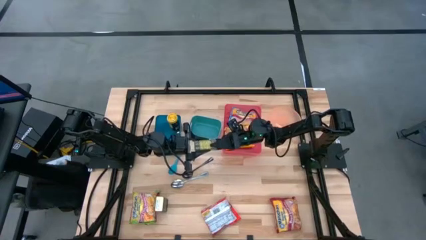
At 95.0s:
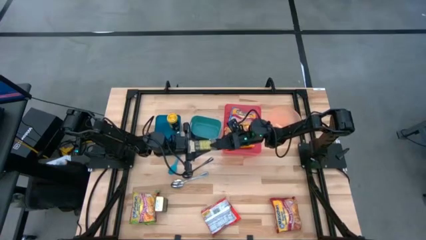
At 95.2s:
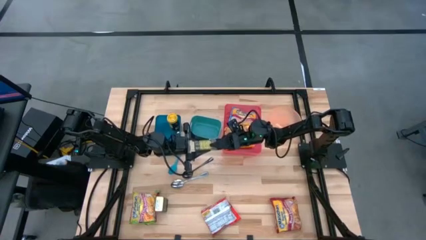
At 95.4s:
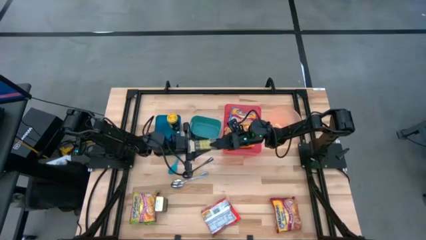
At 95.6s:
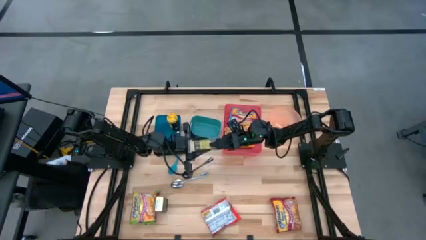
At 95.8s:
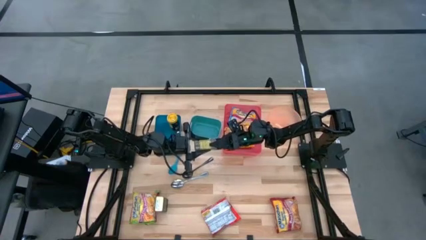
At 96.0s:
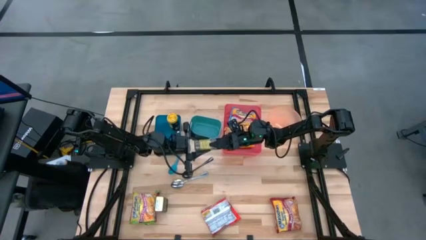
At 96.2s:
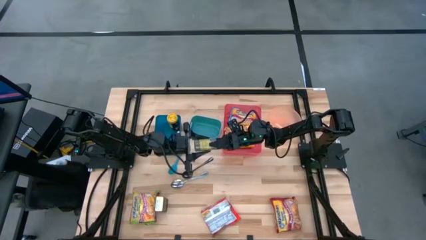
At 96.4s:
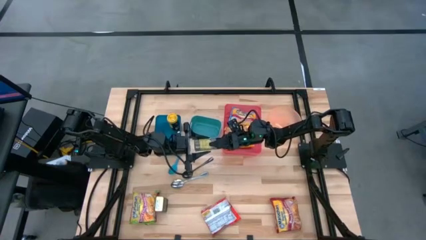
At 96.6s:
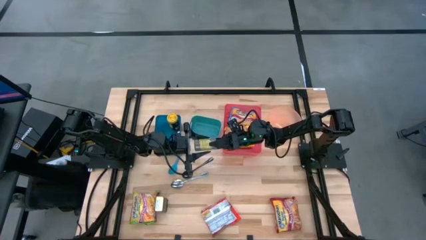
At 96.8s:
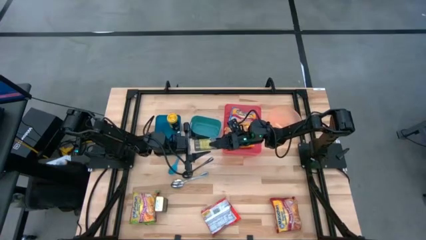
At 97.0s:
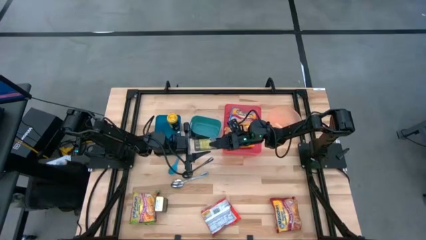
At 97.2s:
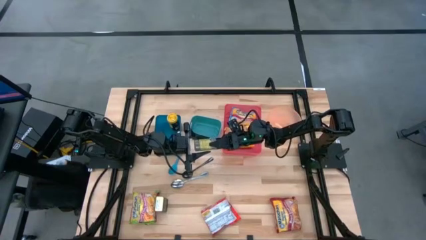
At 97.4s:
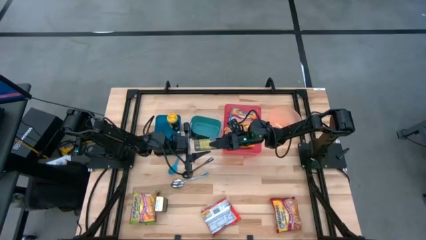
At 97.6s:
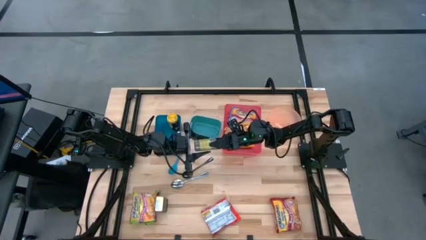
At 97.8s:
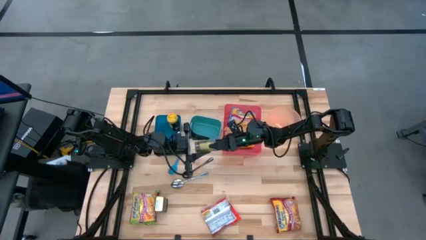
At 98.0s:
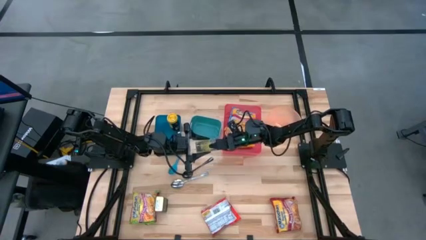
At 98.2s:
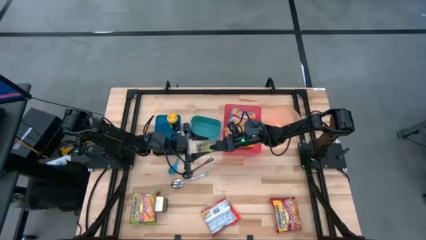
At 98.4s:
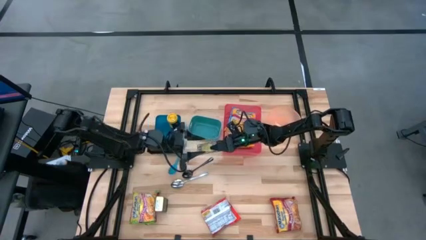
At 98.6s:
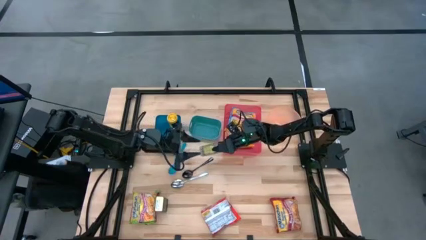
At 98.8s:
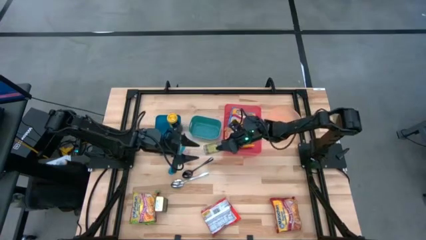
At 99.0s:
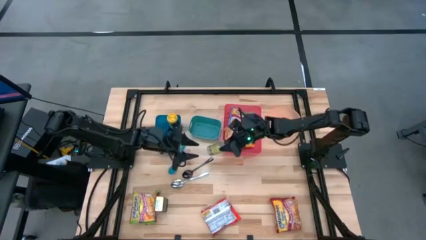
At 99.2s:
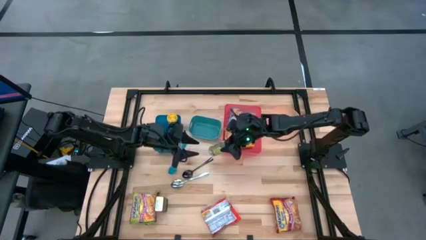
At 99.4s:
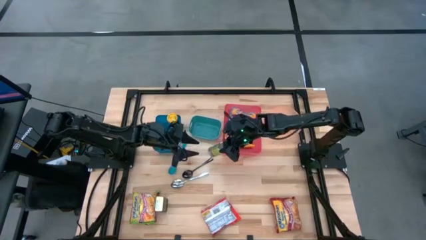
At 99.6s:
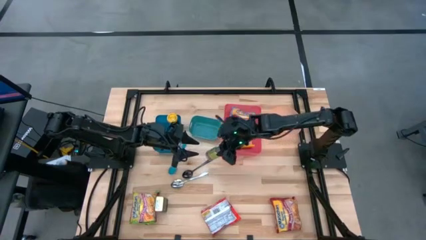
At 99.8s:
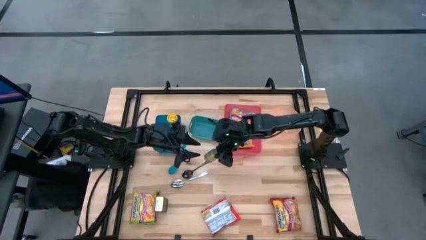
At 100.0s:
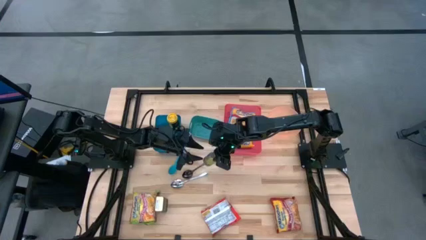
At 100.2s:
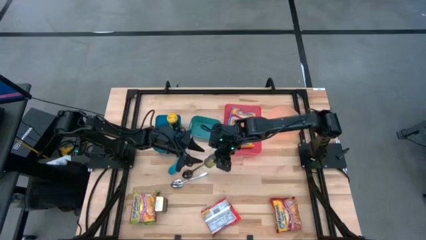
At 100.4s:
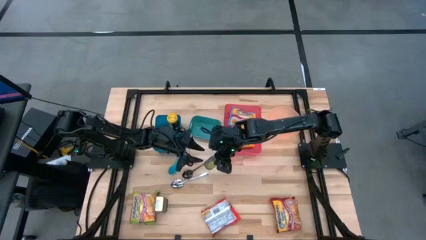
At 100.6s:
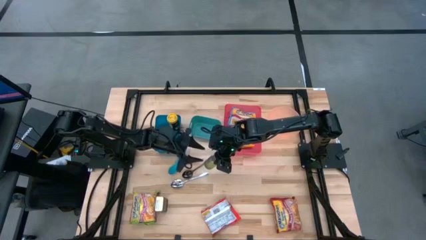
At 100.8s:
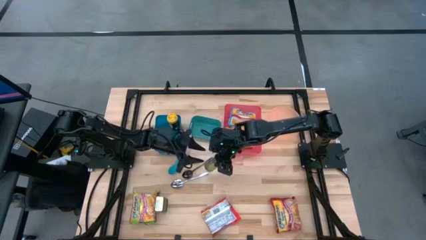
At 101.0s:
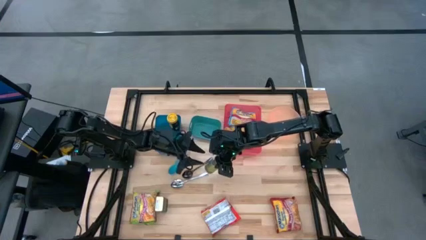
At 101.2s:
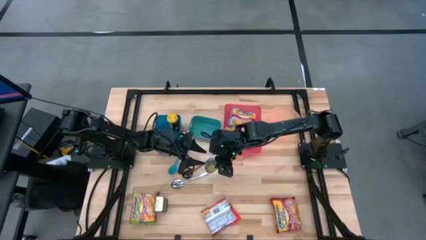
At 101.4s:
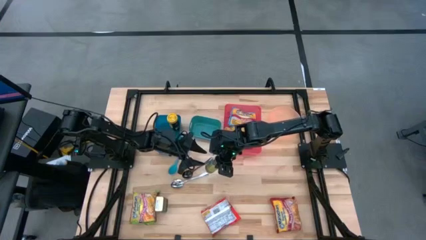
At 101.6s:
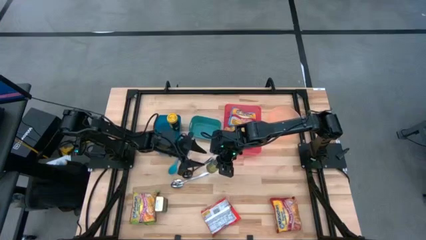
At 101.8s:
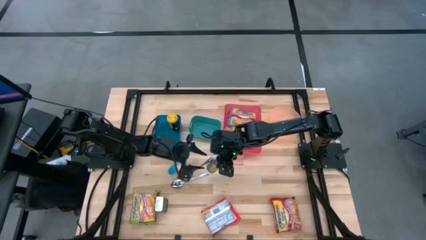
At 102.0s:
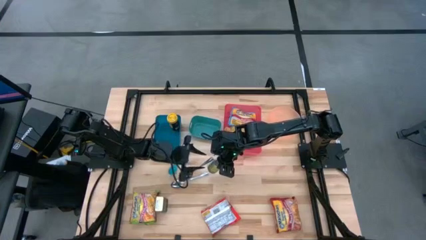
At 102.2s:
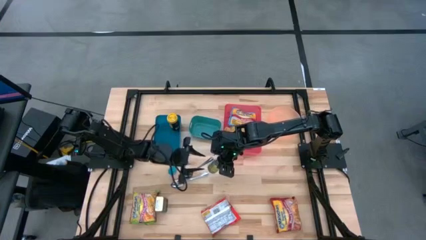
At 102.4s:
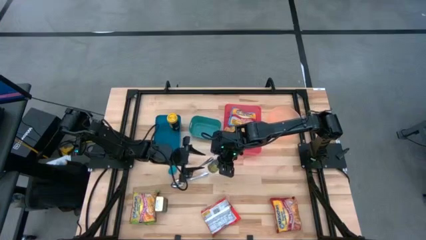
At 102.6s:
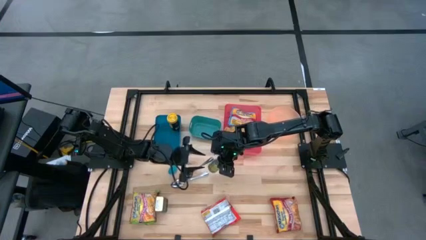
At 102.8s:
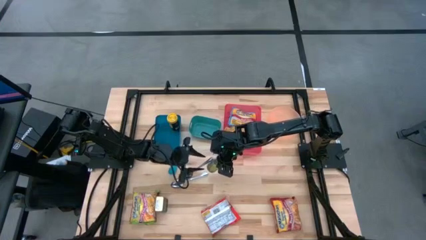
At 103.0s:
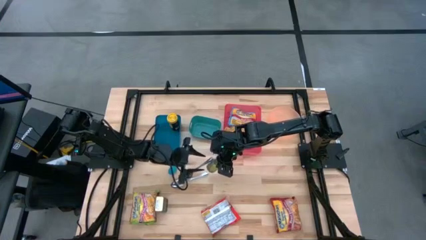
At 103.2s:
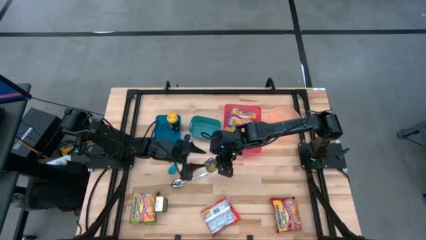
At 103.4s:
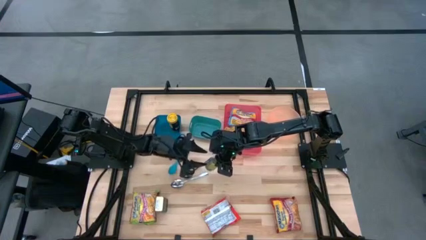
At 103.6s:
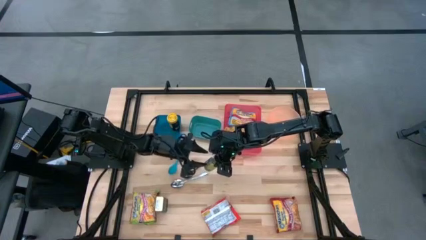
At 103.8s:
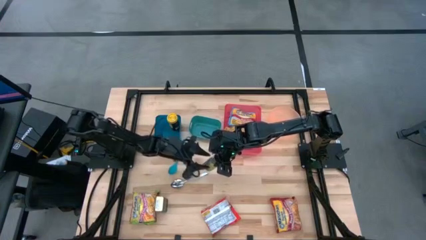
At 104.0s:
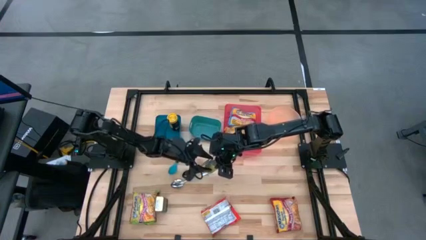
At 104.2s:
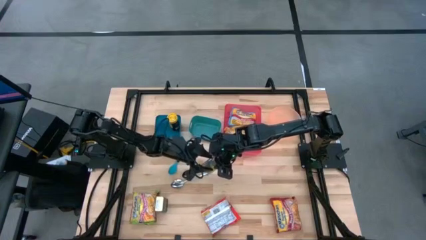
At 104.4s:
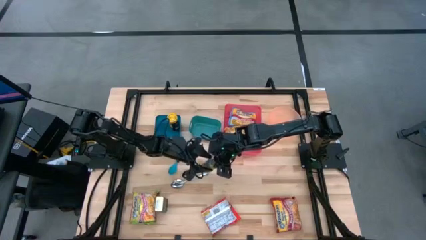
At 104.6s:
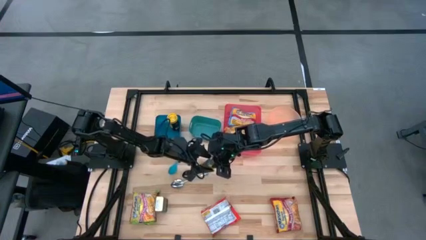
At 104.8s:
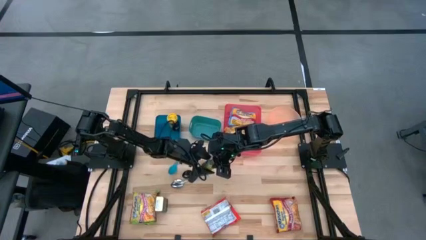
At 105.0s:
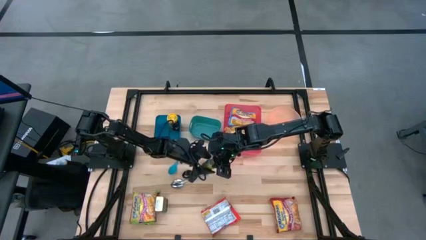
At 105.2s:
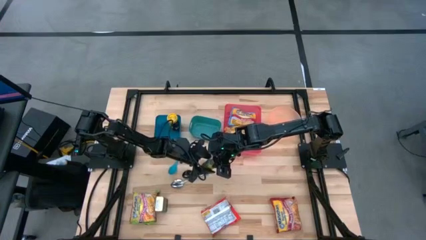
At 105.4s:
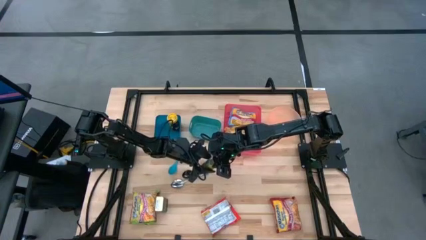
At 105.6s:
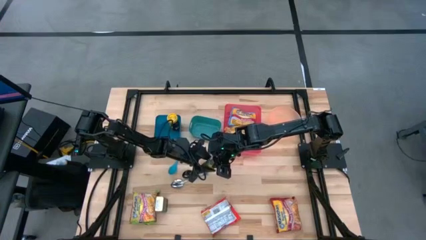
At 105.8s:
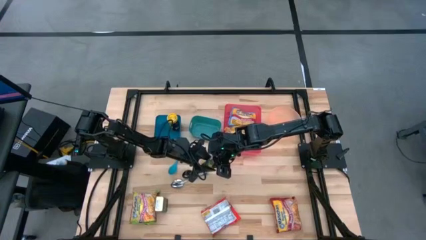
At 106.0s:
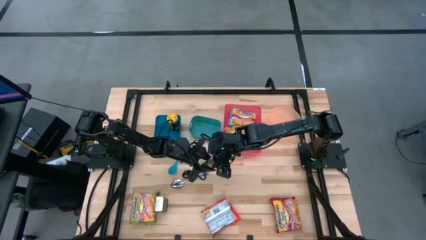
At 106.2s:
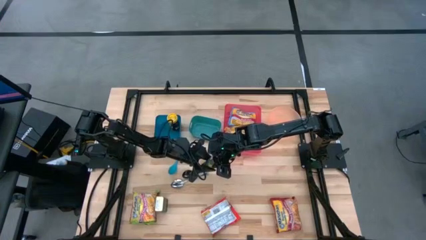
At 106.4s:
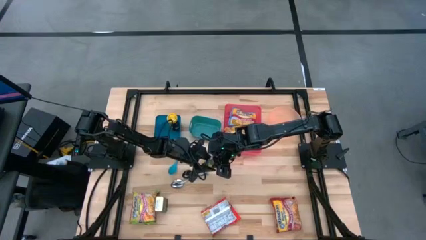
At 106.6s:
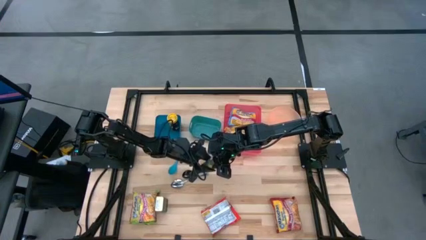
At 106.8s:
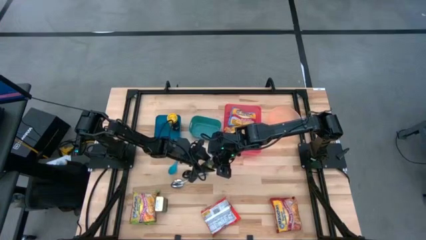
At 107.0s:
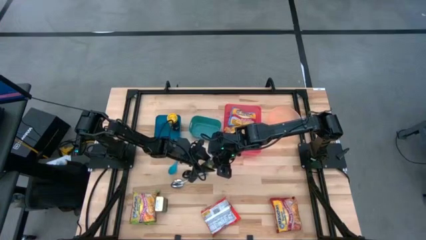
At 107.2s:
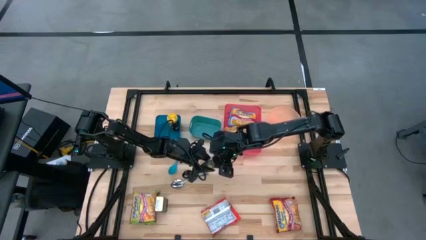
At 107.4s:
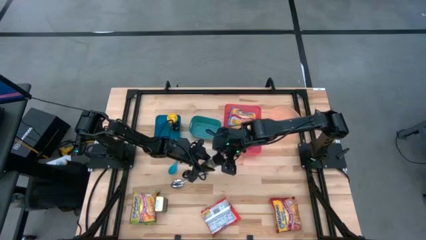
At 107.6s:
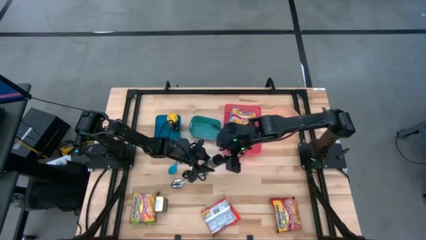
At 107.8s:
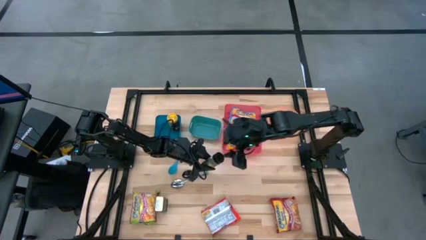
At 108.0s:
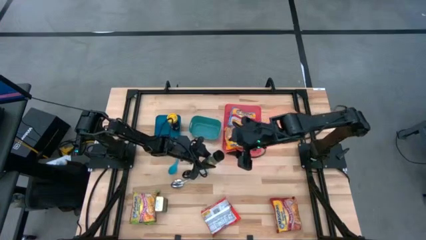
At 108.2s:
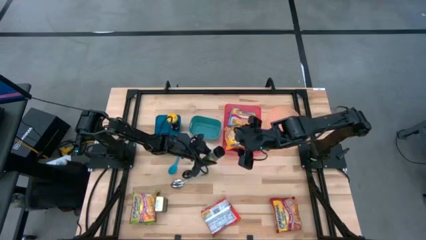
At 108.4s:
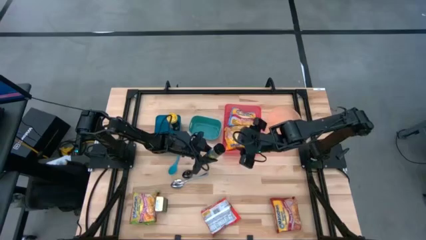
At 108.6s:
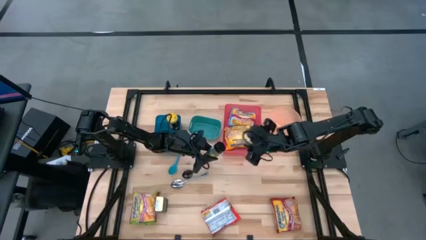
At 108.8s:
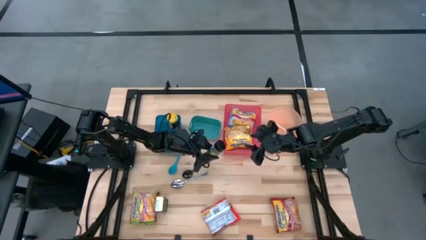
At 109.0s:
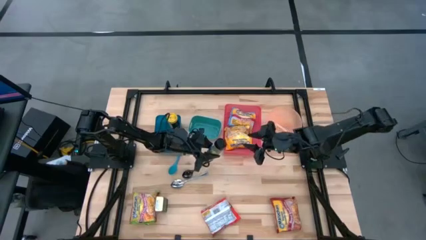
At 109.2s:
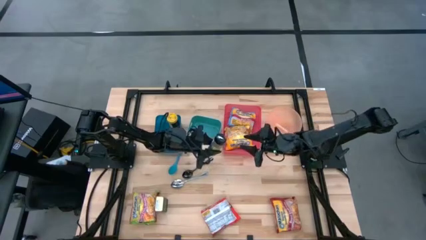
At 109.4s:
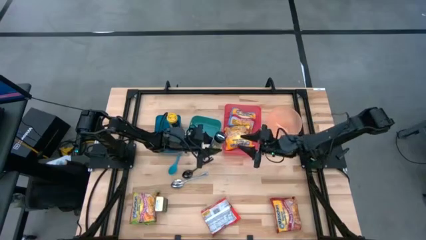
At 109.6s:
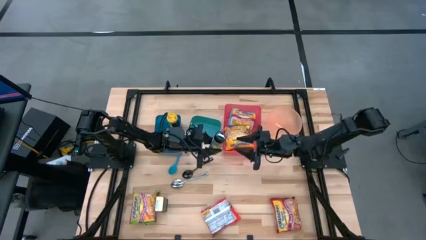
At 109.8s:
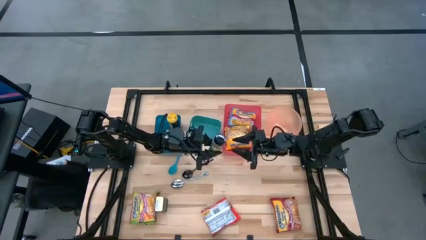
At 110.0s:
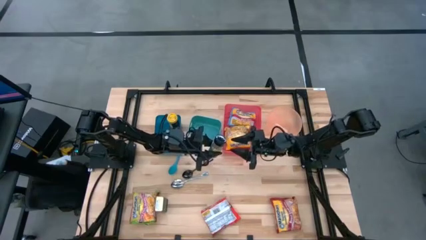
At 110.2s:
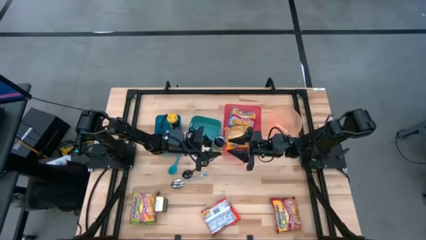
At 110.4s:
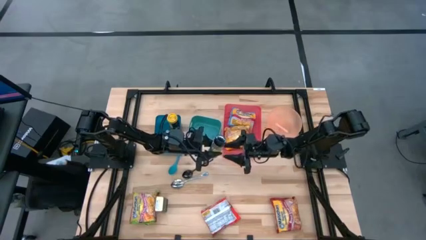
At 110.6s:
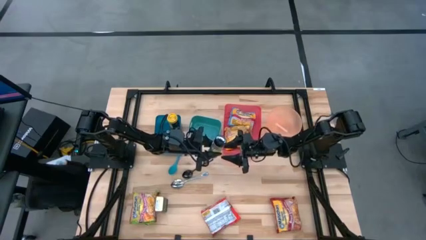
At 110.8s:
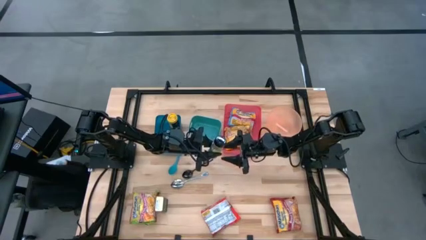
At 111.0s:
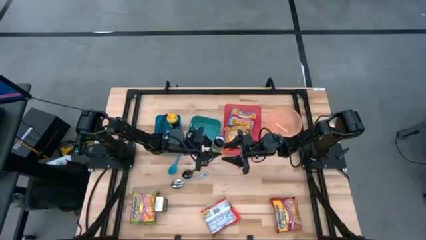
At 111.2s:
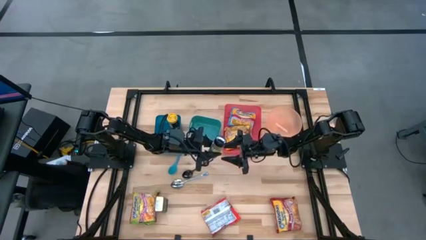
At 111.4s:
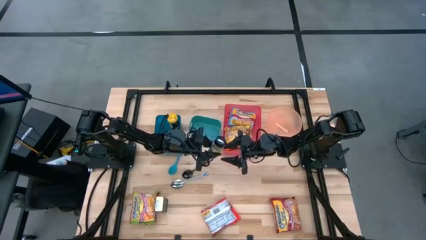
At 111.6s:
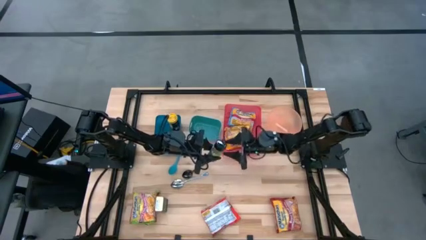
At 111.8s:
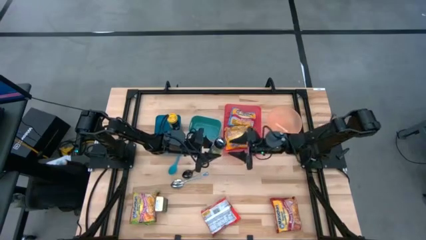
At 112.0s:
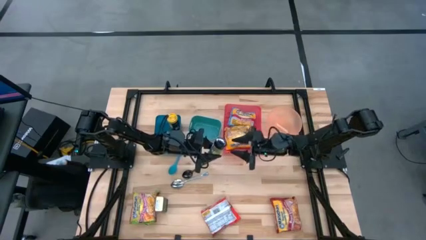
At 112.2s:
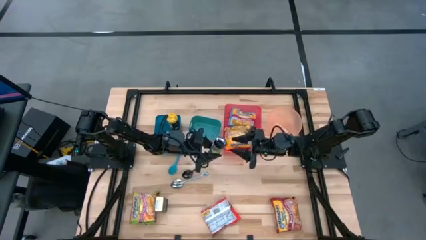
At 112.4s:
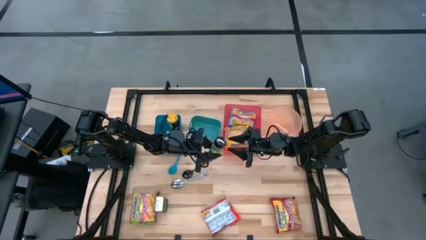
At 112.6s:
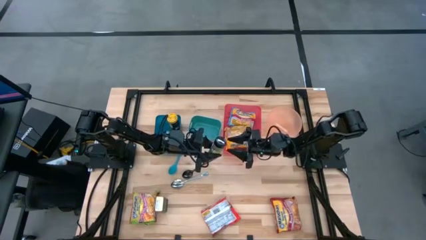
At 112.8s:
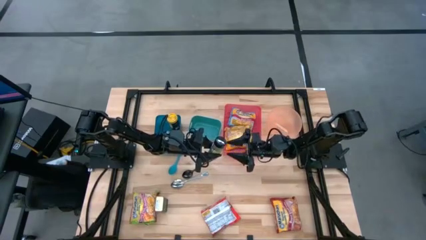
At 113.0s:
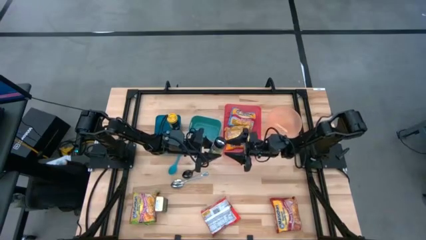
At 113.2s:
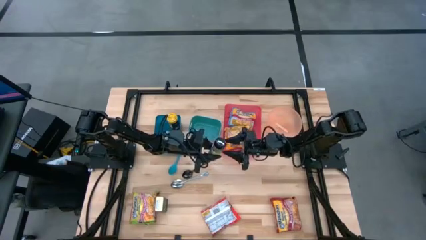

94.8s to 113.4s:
Task: Pick & Place Food Item
Put the green seasoning bottle into the blue bin
